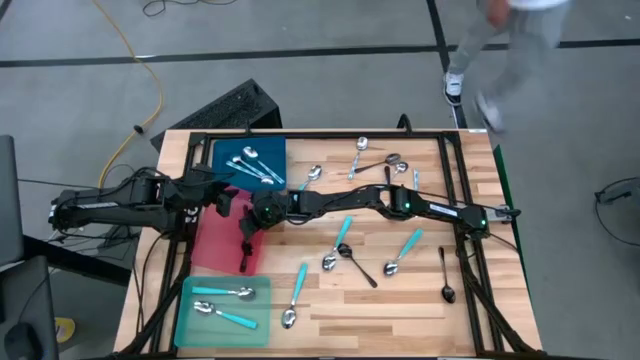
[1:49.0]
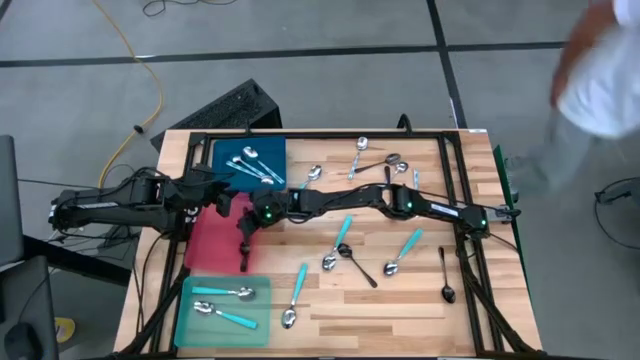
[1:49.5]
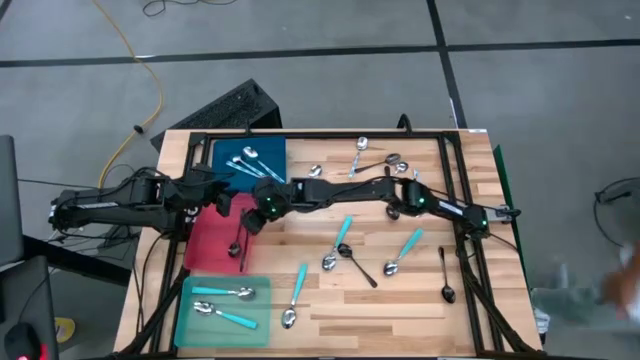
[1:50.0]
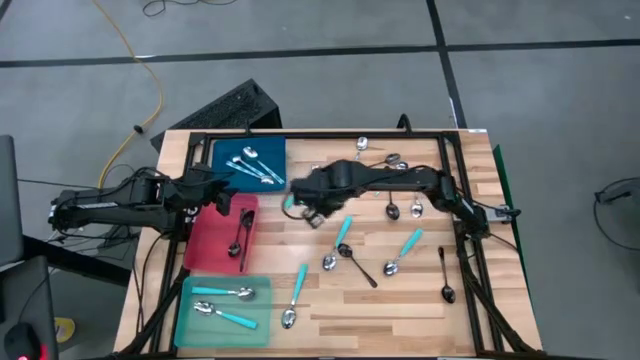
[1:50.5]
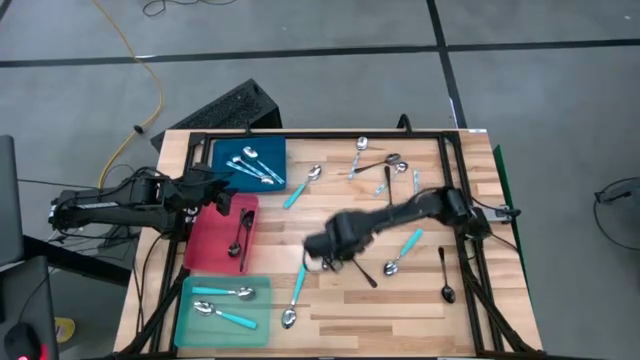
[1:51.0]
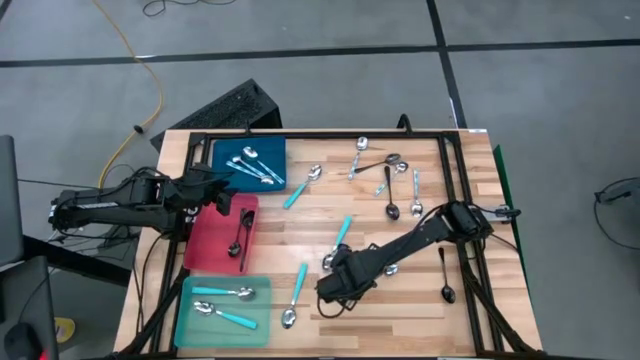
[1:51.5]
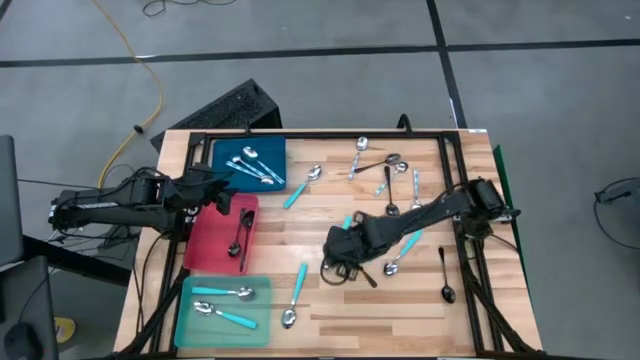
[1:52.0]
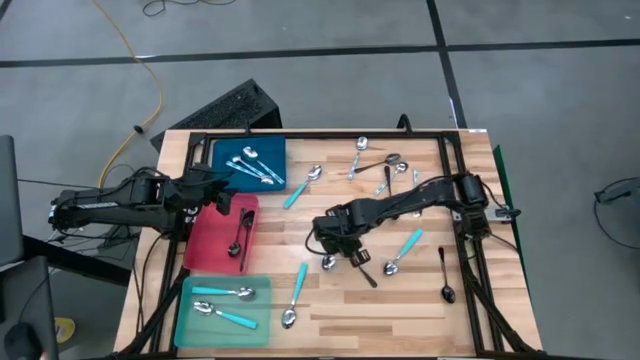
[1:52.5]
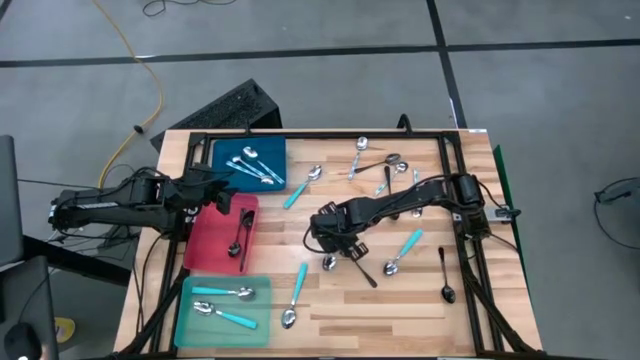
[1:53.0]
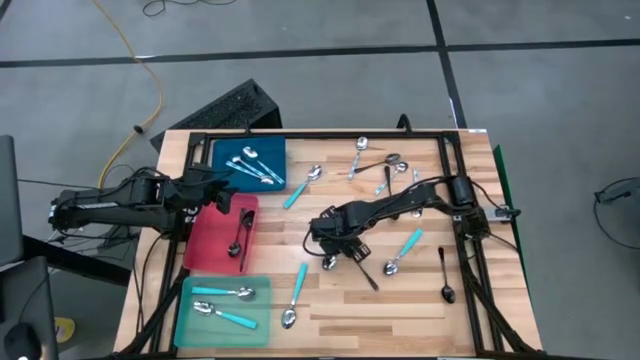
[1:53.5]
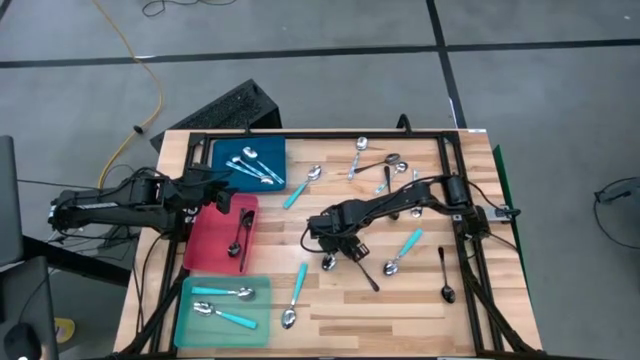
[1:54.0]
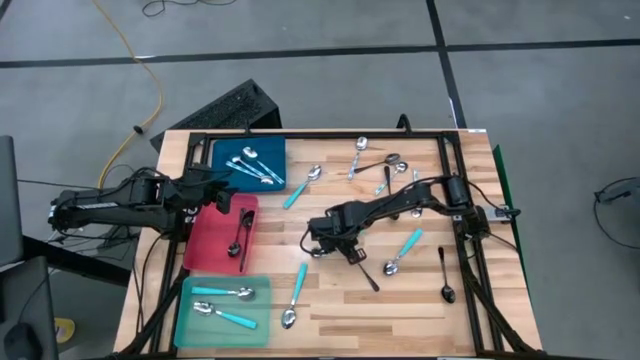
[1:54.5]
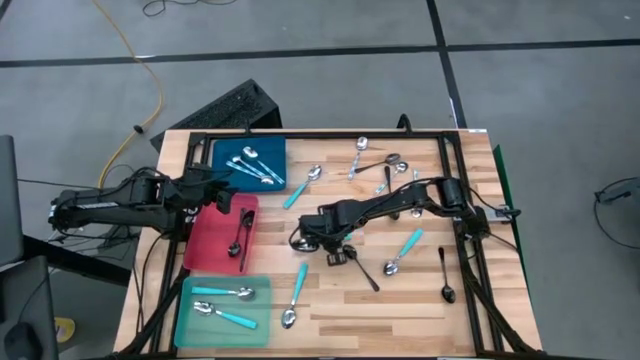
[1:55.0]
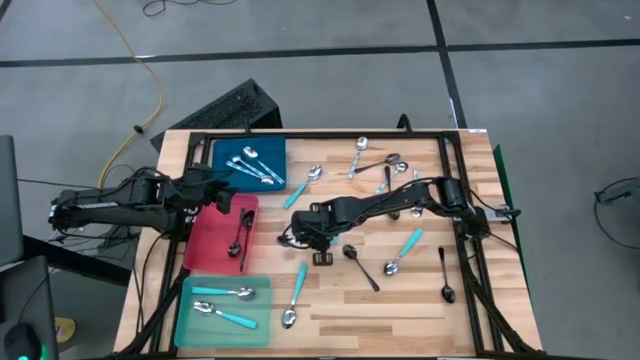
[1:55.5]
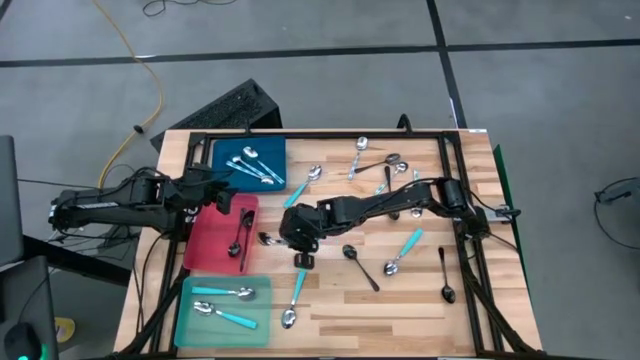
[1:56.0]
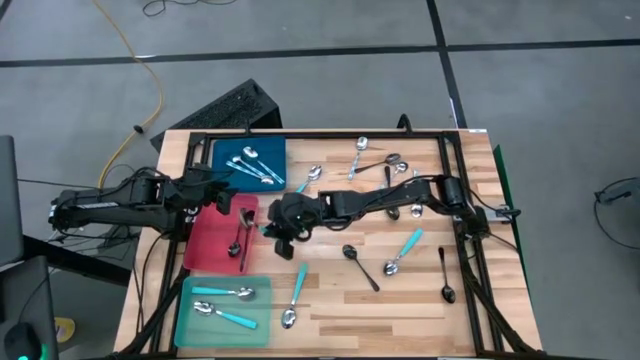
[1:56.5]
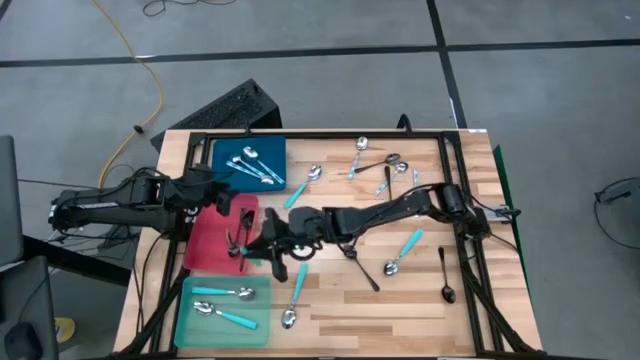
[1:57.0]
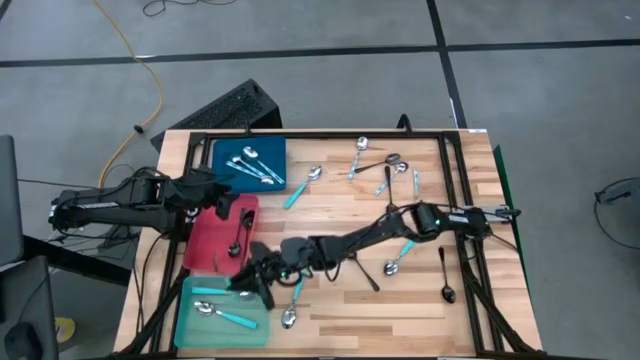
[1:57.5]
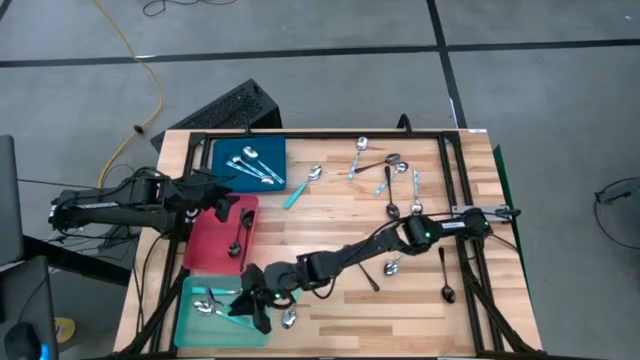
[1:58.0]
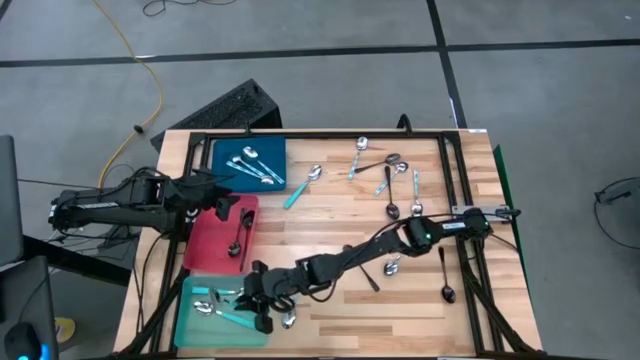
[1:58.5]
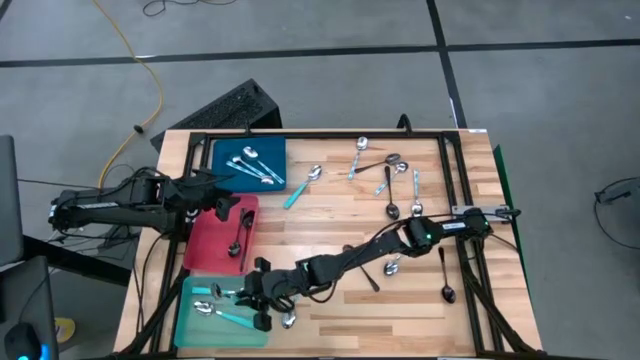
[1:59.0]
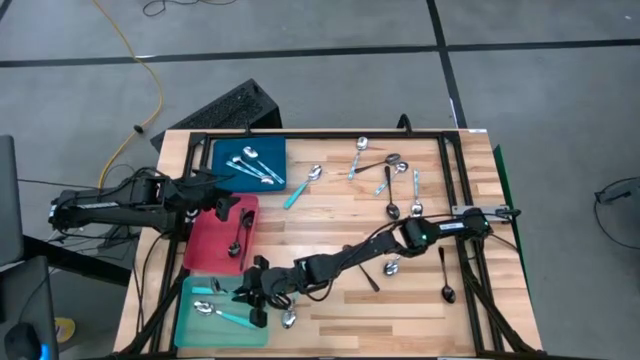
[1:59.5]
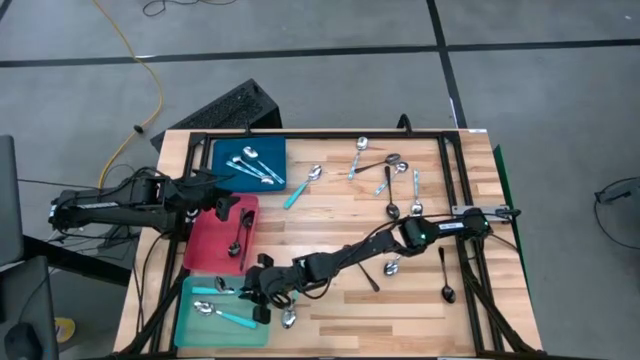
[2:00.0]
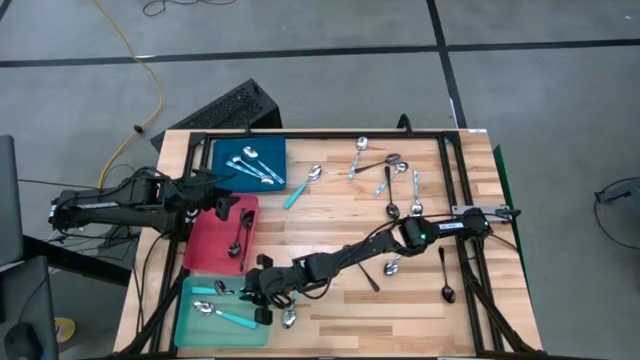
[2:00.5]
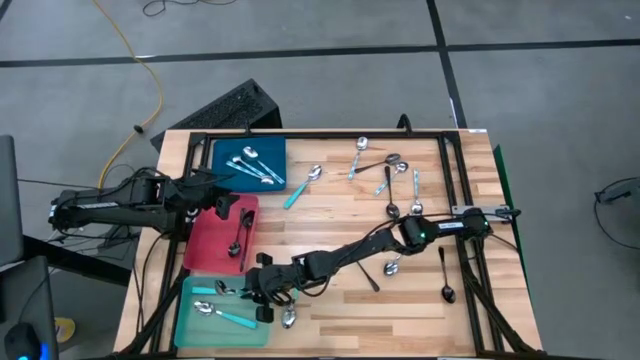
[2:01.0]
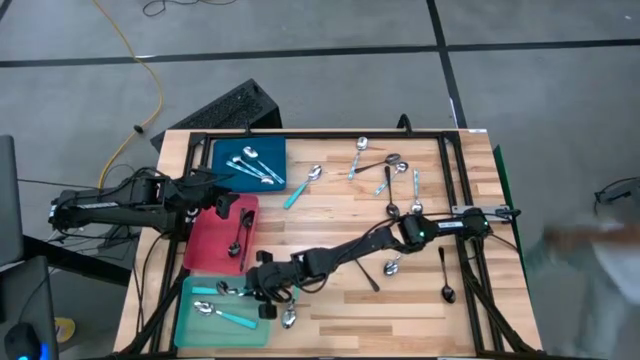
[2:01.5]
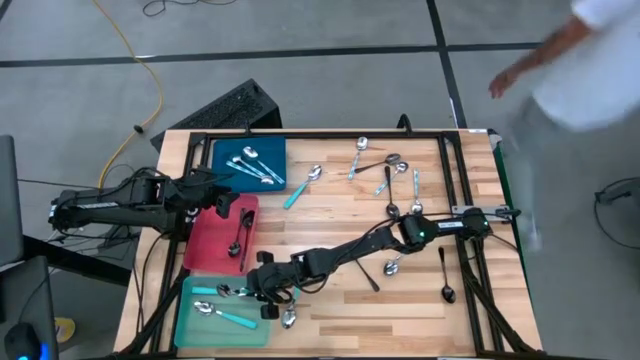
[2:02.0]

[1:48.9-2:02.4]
Task: Sort silverware by color (type)
Put the light blue spoon into the light blue bin

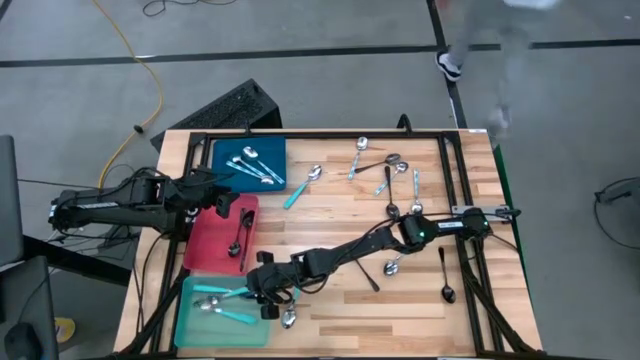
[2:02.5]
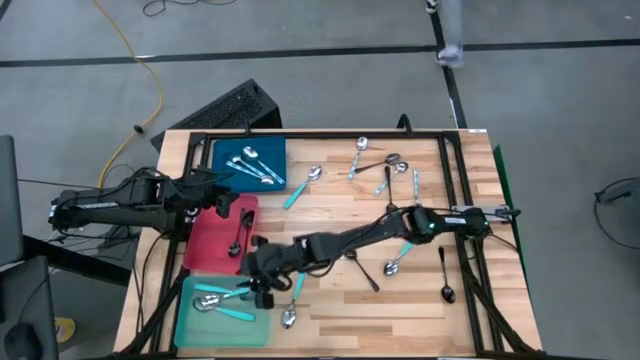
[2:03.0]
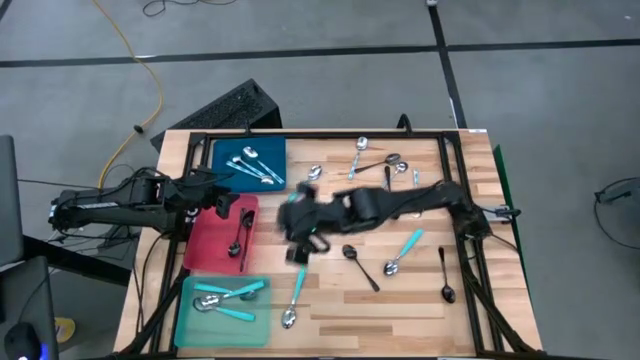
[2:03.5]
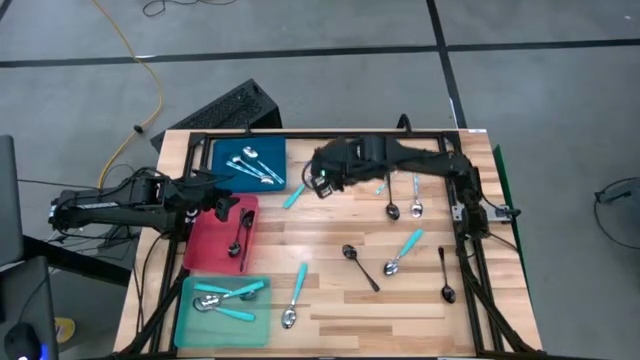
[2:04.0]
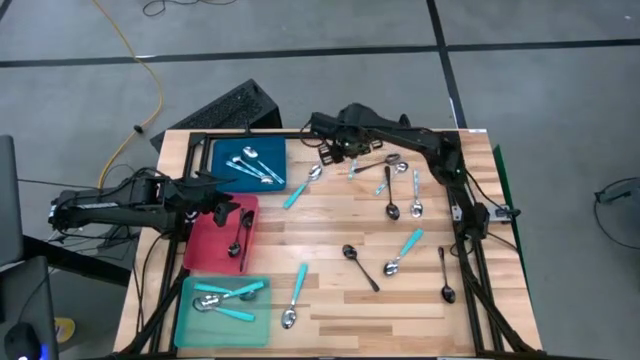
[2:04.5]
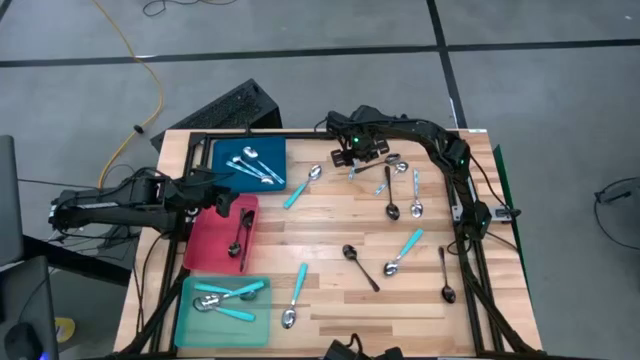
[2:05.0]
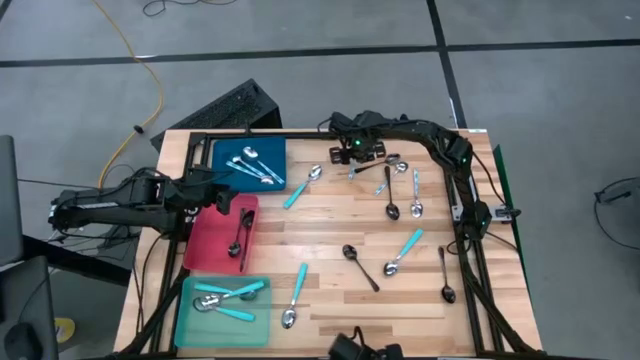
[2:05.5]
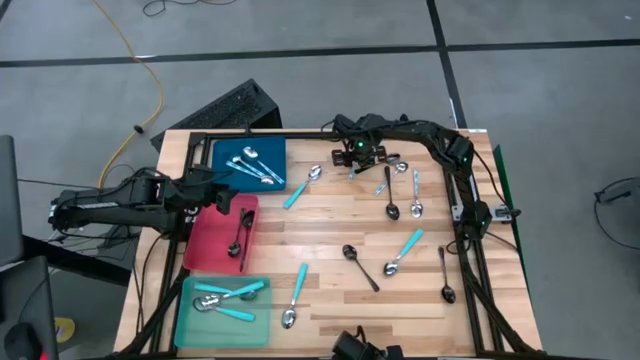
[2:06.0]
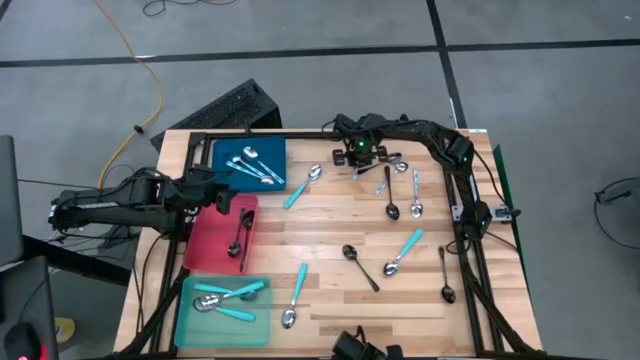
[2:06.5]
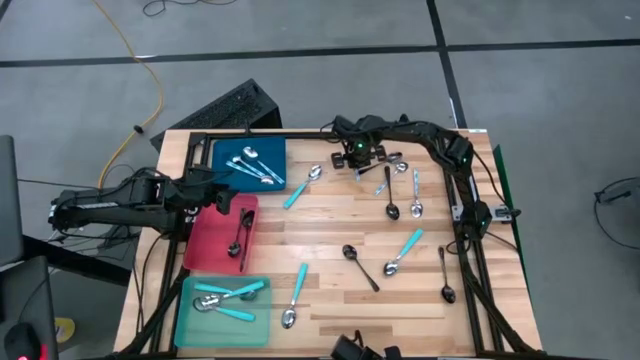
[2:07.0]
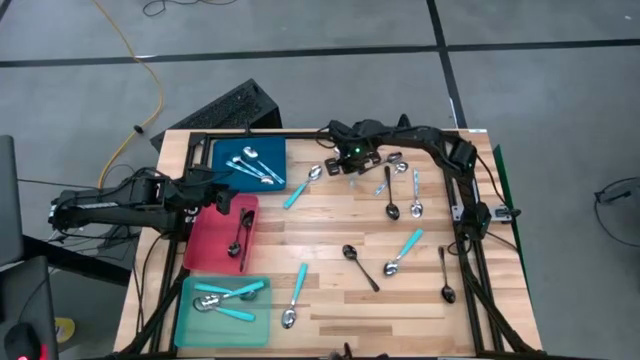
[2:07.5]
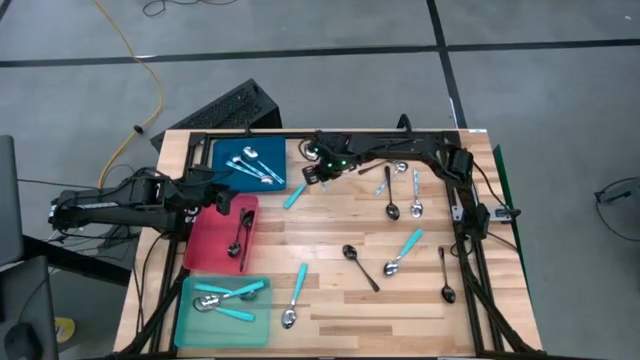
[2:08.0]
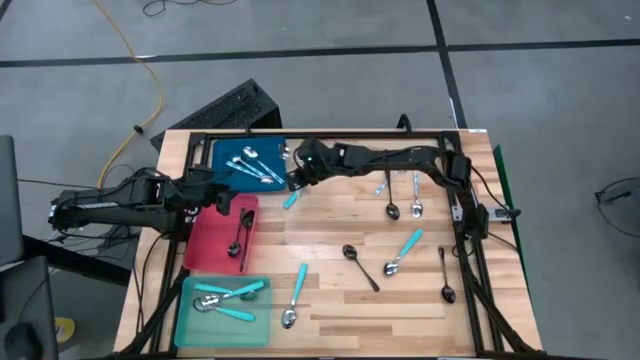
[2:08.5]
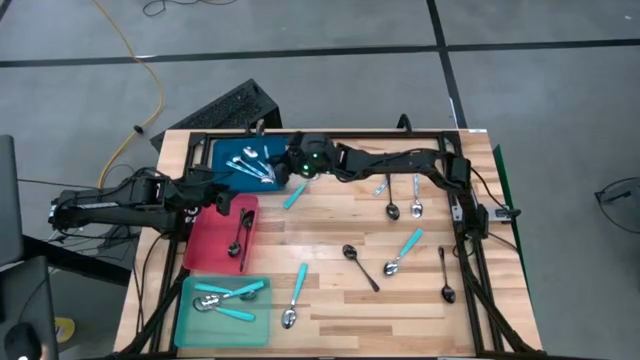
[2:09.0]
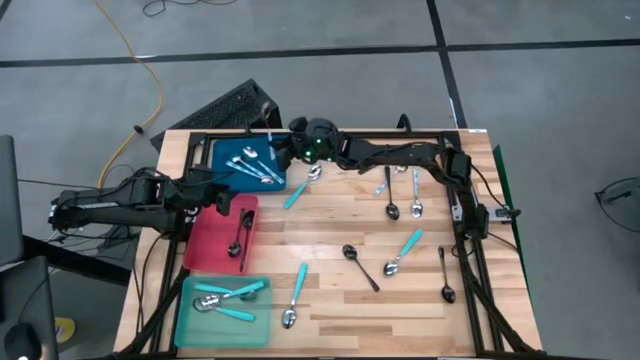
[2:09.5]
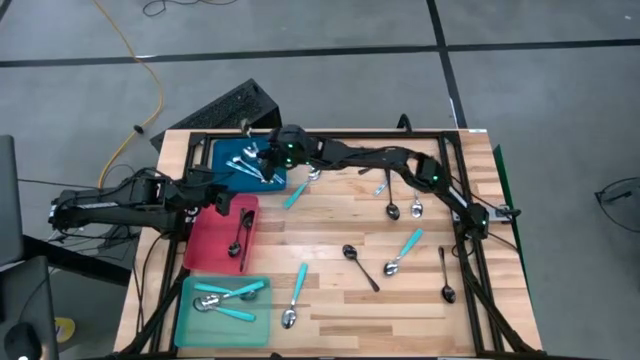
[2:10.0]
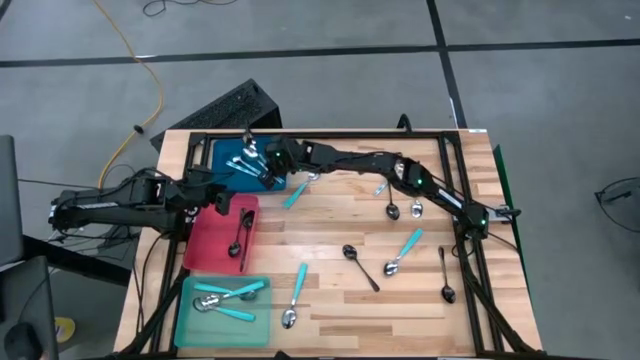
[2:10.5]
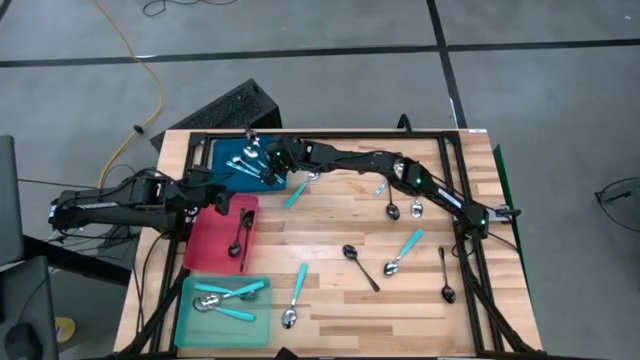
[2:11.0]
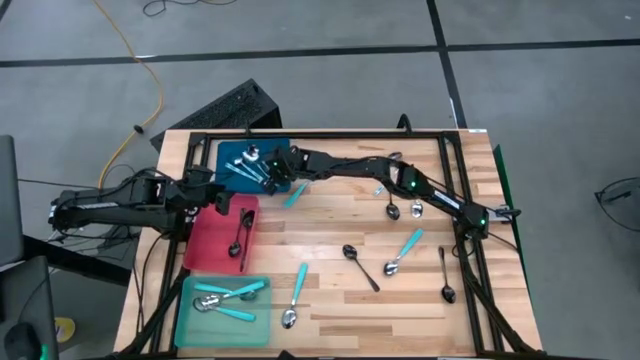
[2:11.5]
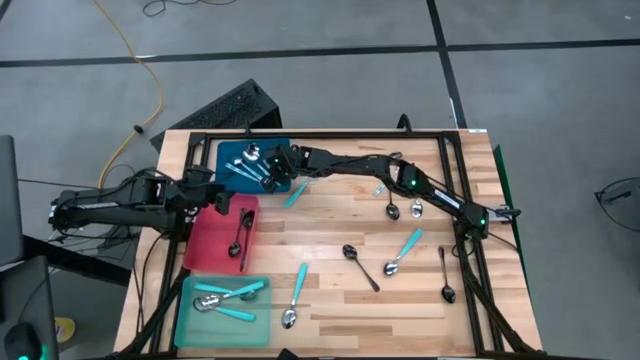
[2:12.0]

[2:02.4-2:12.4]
Put the blue patterned spoon into the blue bin
